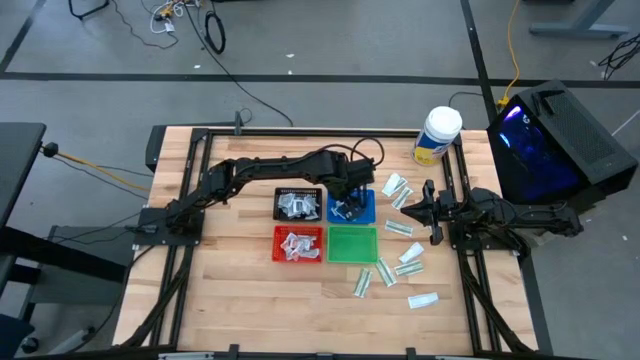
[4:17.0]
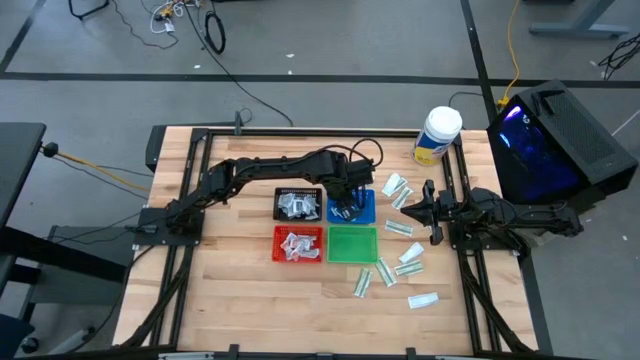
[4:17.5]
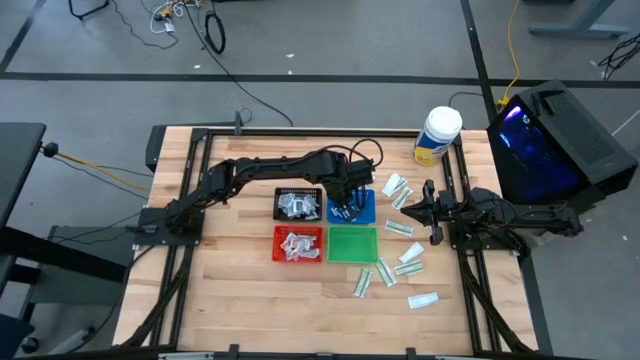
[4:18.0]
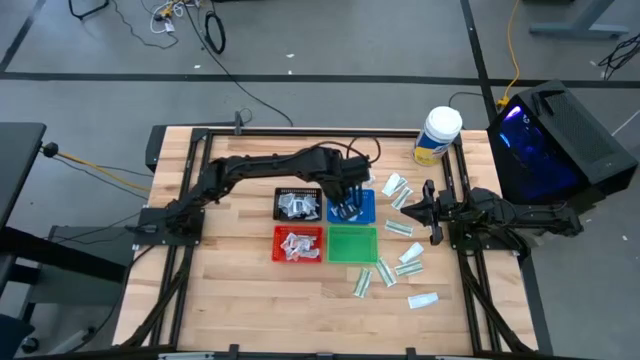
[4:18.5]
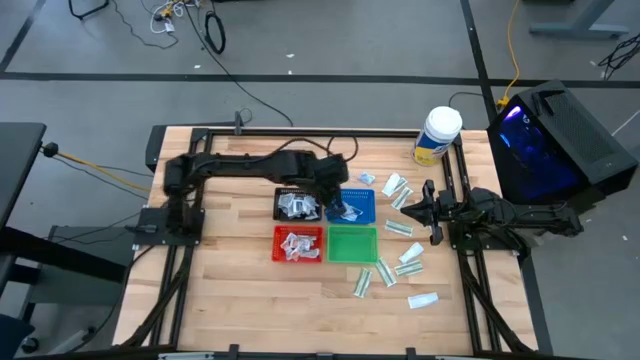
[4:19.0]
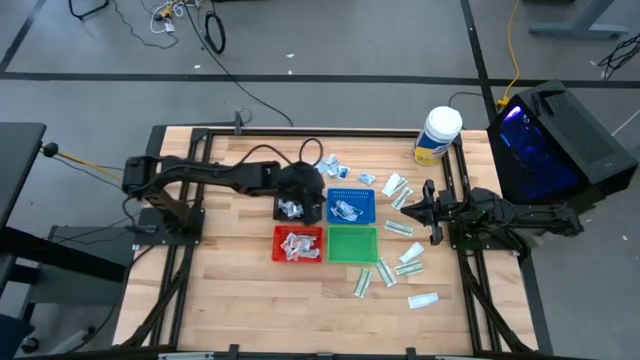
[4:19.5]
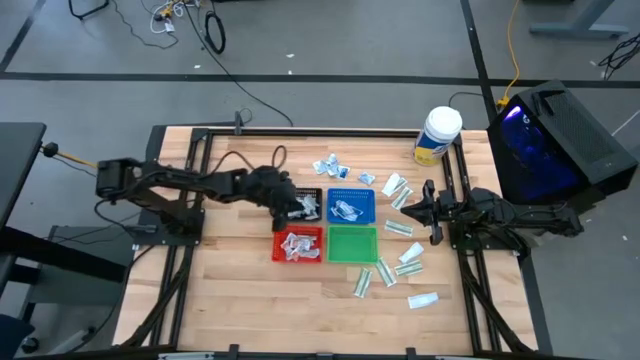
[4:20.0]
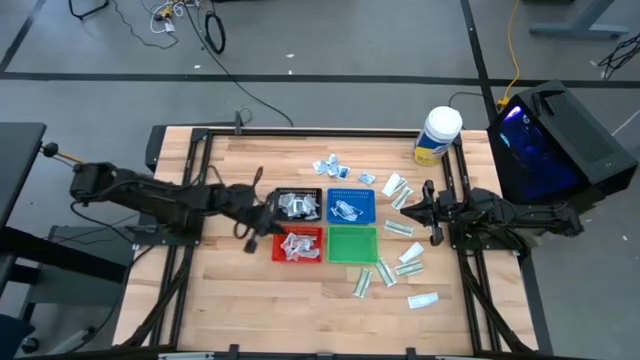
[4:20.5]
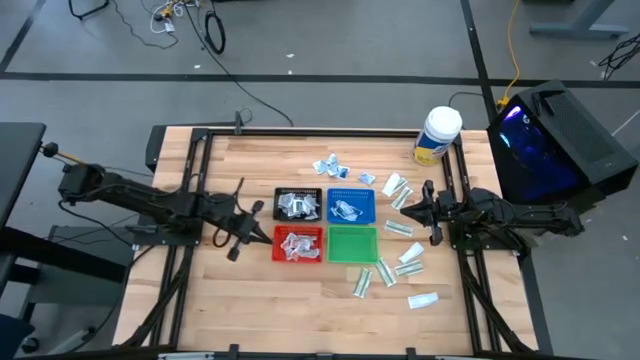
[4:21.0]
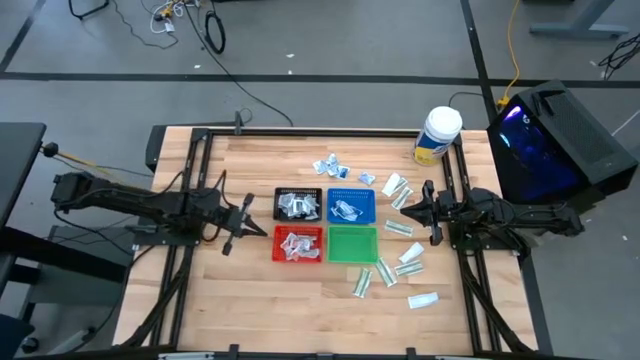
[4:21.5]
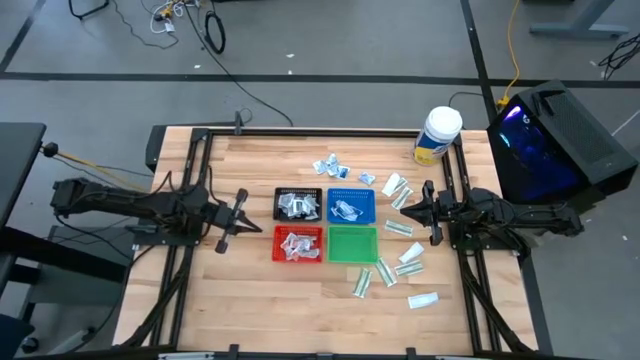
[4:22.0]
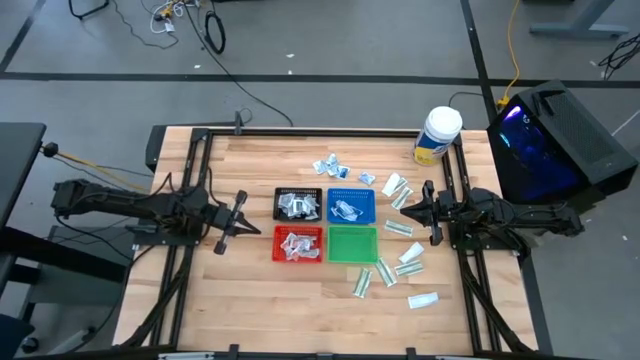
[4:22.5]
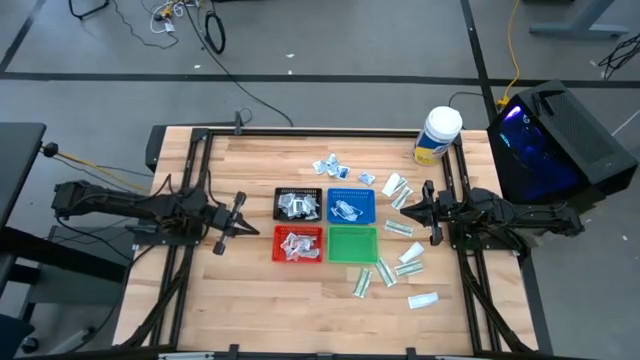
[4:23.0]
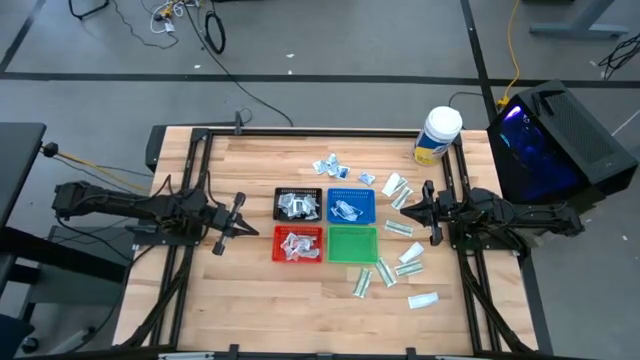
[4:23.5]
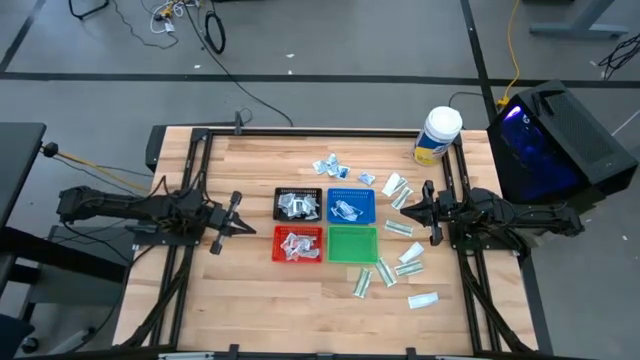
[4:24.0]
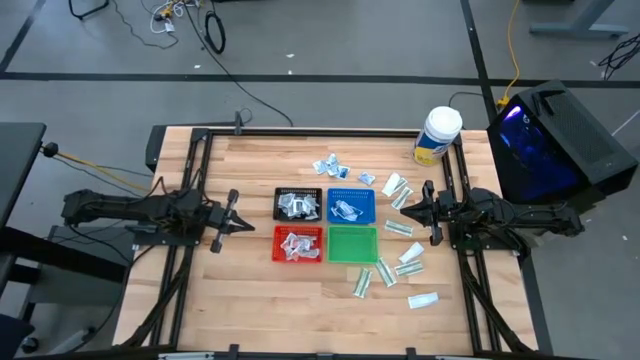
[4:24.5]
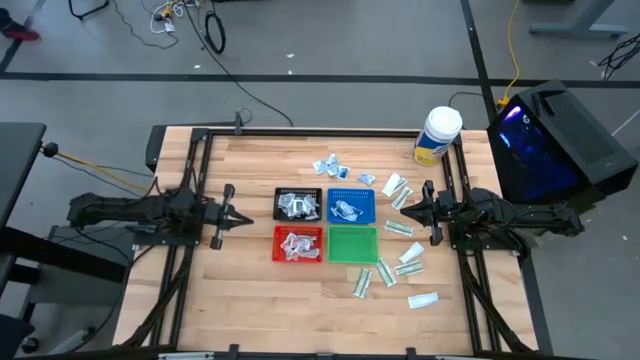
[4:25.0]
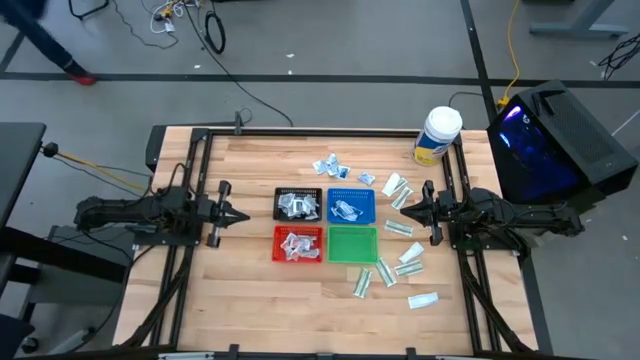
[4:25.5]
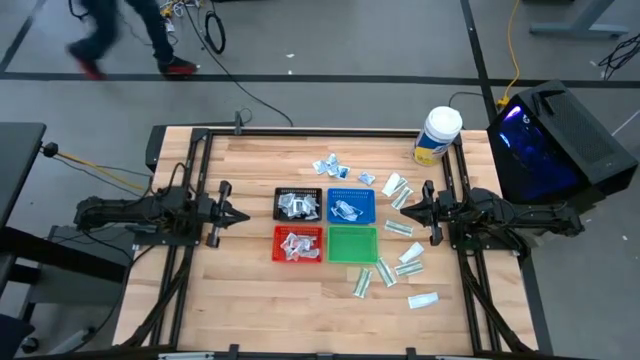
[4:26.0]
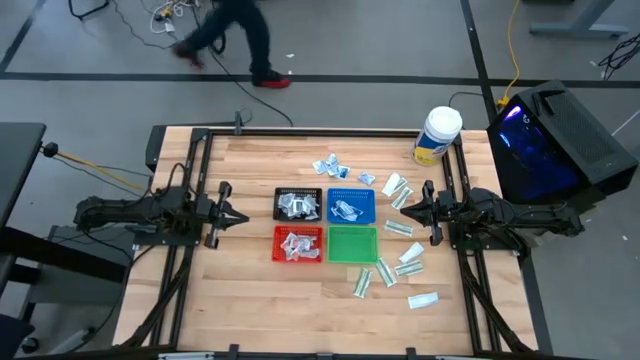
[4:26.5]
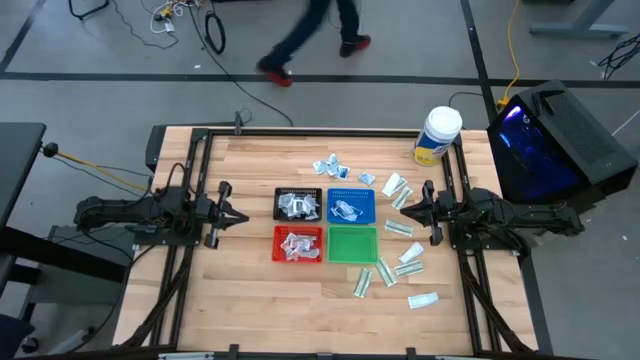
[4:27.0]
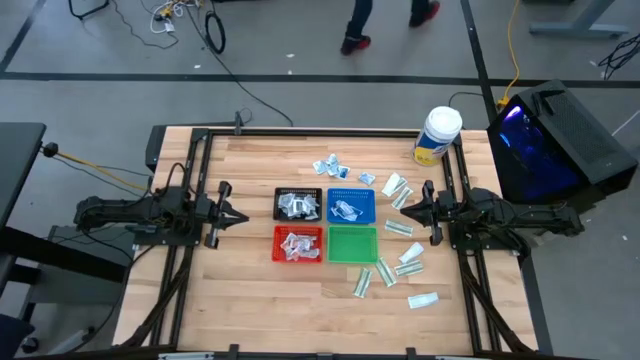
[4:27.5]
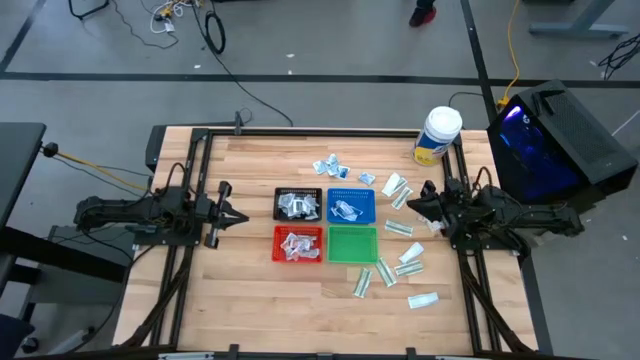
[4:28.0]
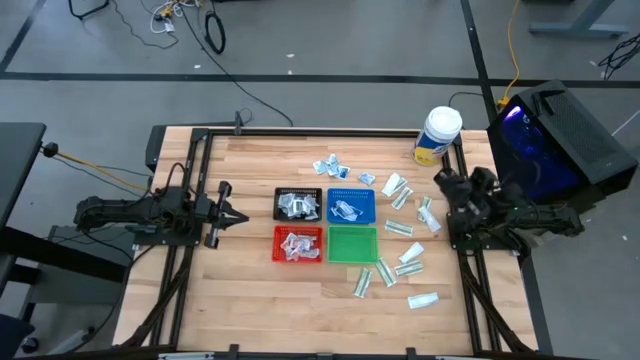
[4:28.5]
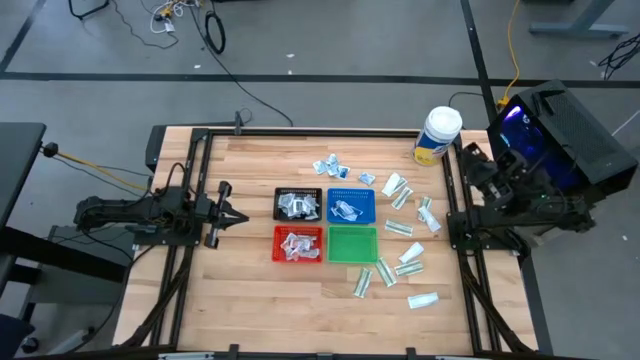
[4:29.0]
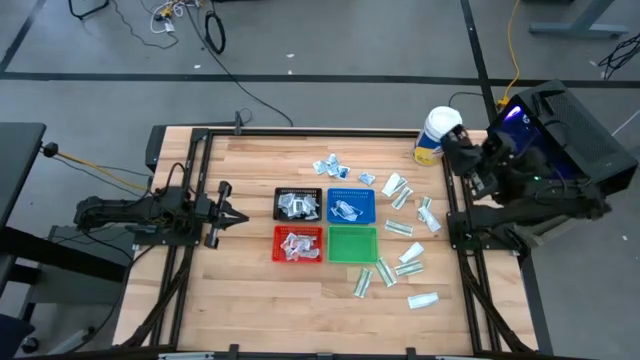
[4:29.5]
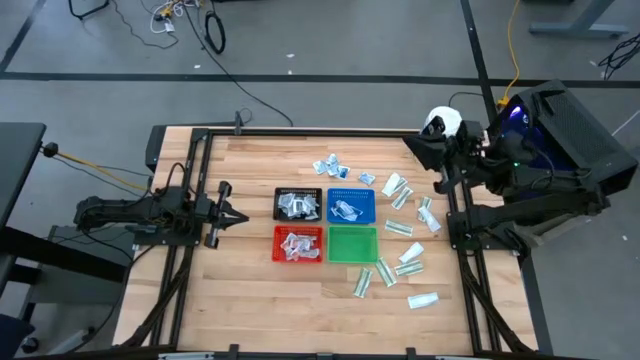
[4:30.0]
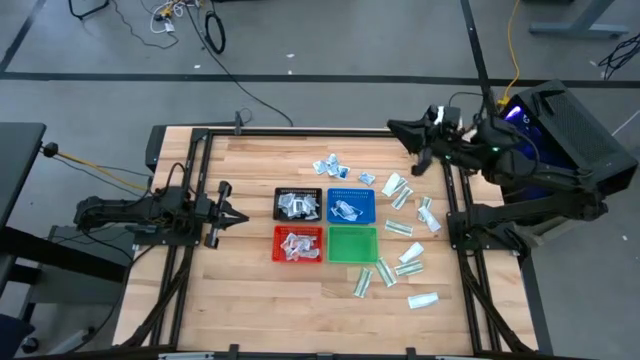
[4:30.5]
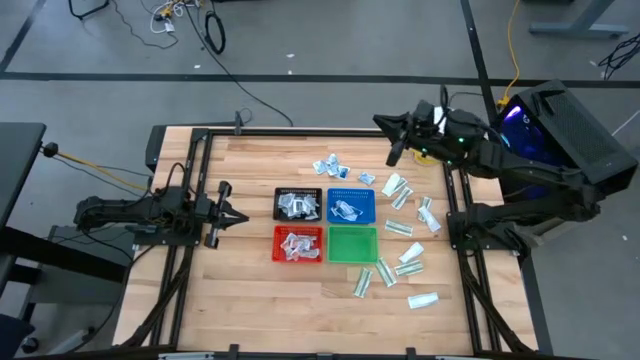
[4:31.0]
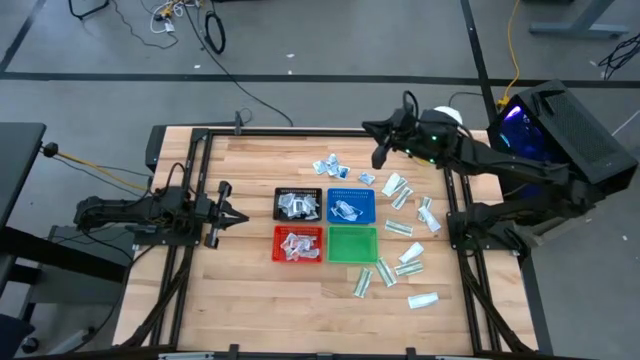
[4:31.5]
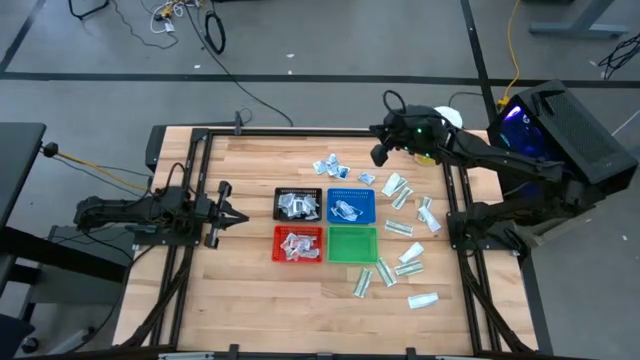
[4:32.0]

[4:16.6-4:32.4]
Task: Pick & Place First Aid Supplies
Put the blue alcohol pad into the blue bin

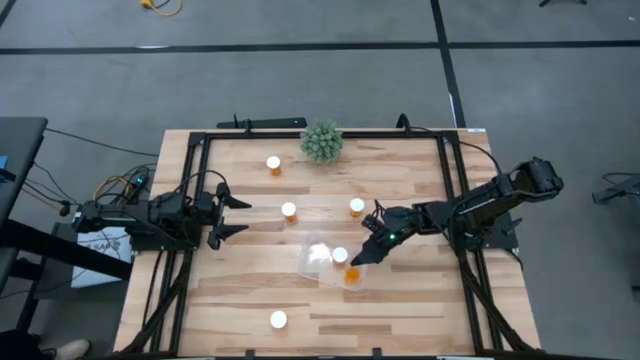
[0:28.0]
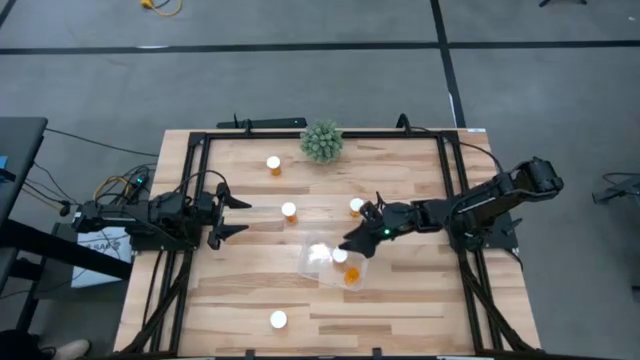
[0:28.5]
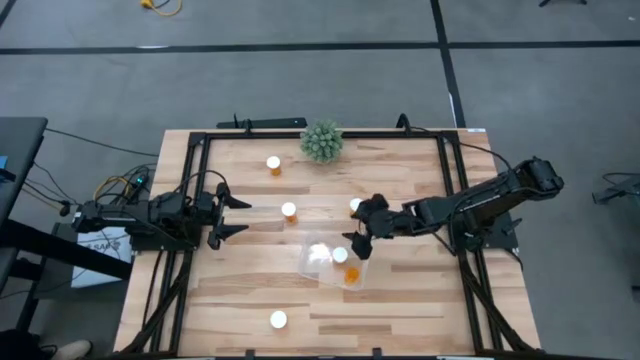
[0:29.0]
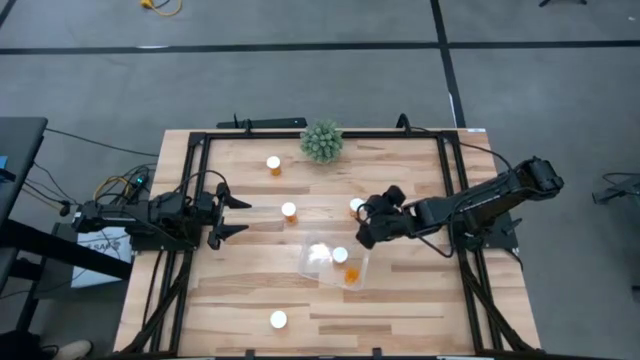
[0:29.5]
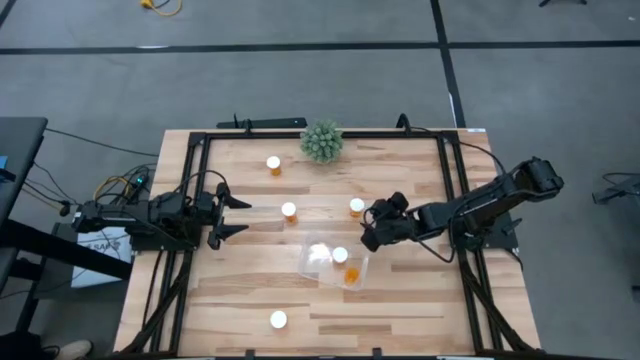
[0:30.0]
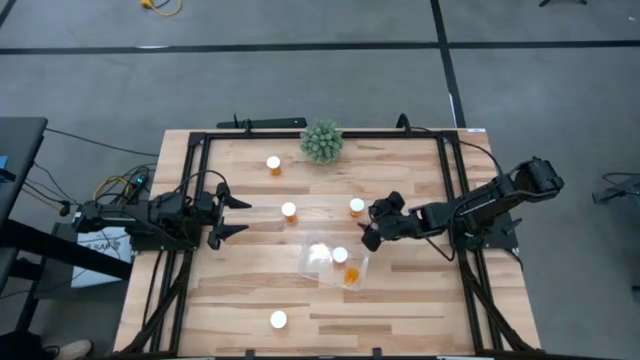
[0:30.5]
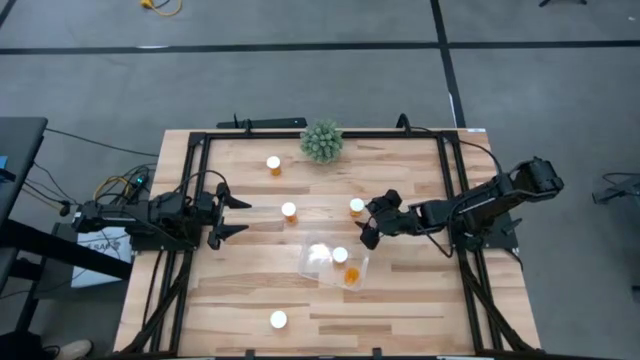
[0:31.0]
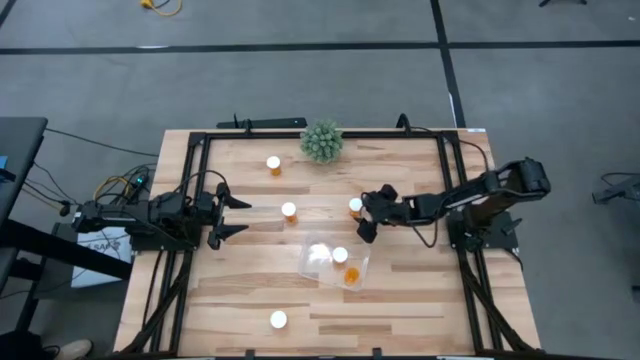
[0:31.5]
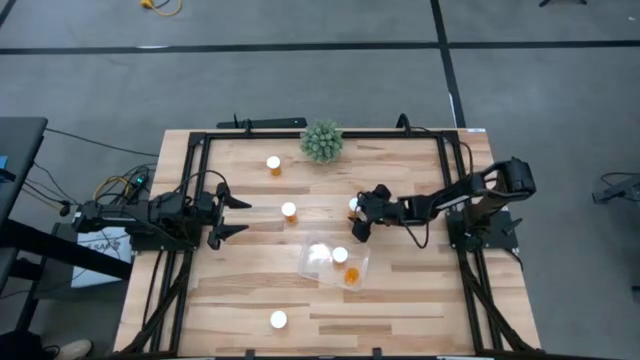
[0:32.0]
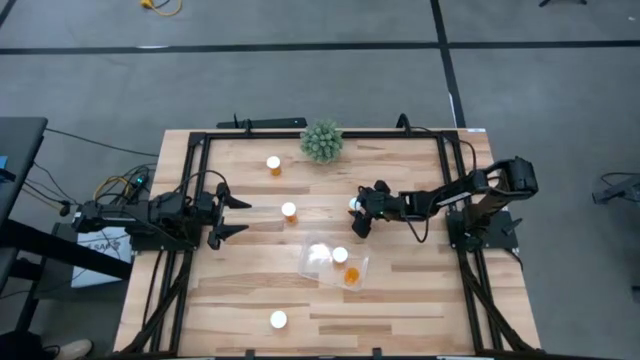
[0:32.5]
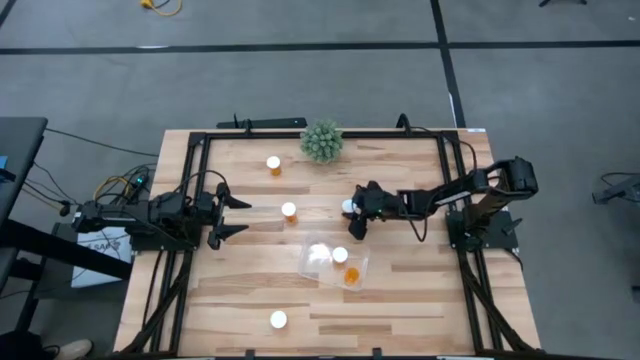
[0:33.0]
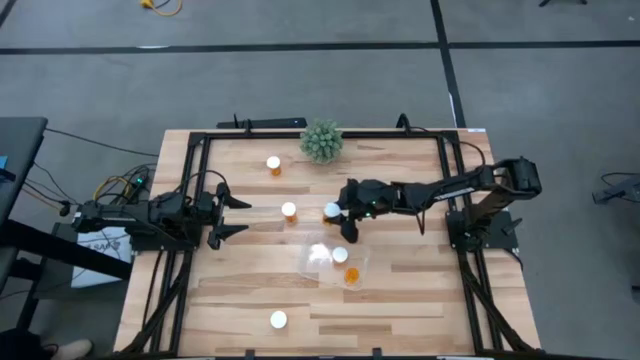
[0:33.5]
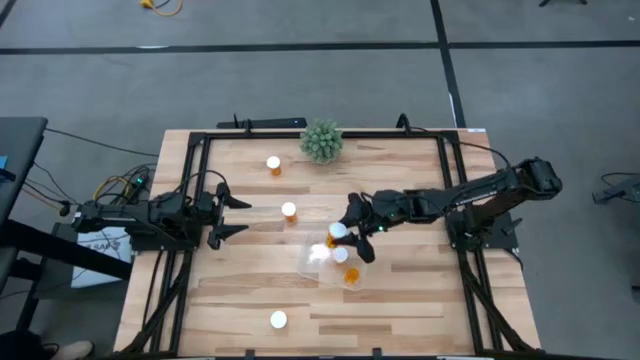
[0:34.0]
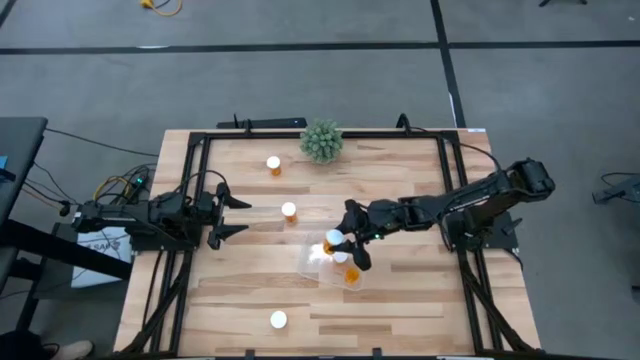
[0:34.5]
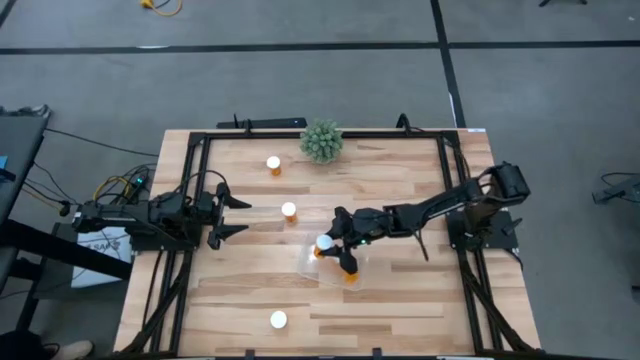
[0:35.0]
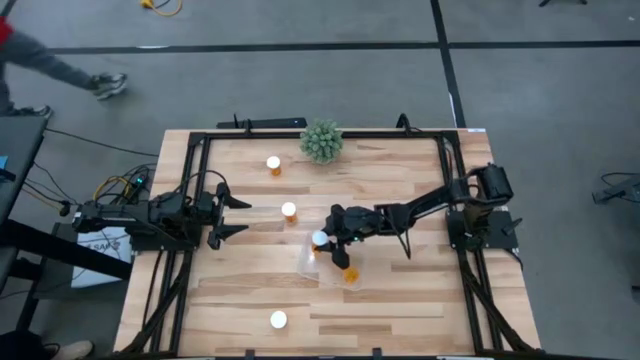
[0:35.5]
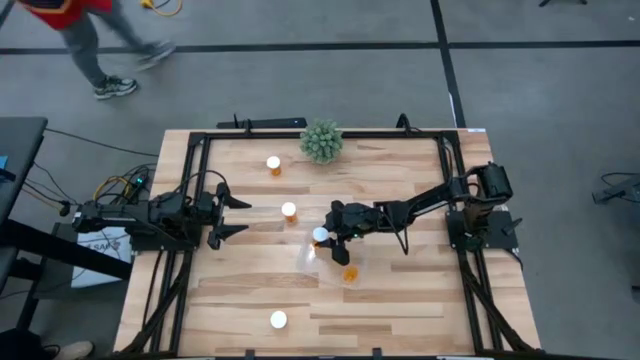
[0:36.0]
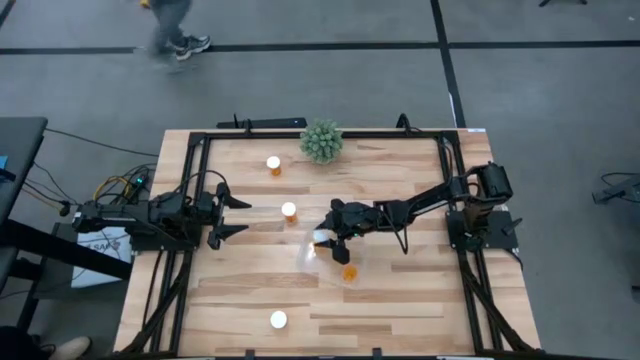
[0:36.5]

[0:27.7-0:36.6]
Task: Pick and place pill bottles into a basket
Put the orange pill bottle into the transparent bin
